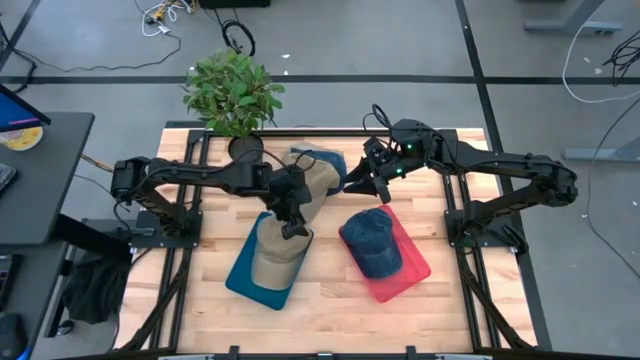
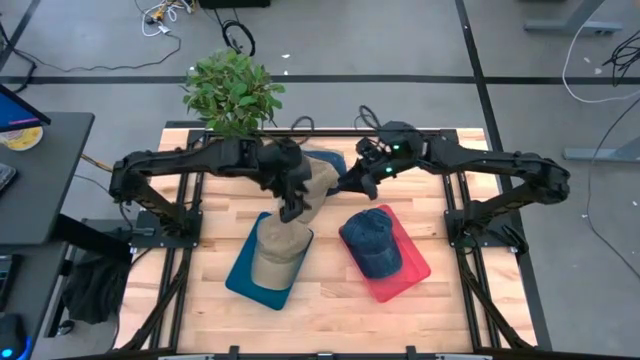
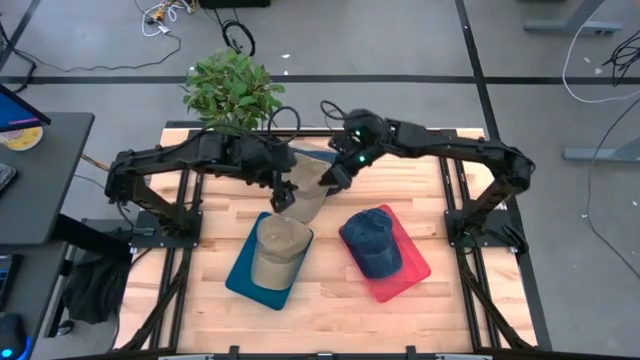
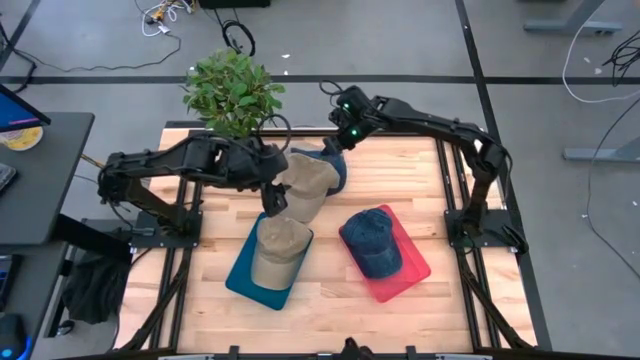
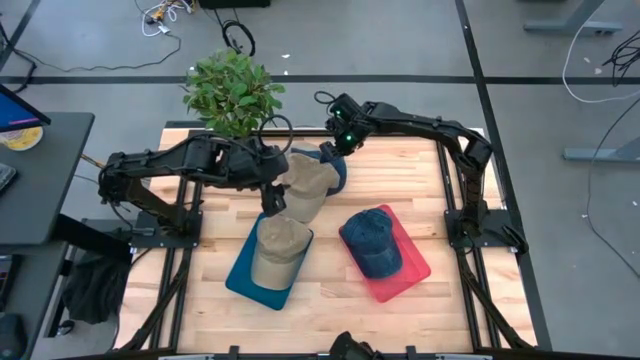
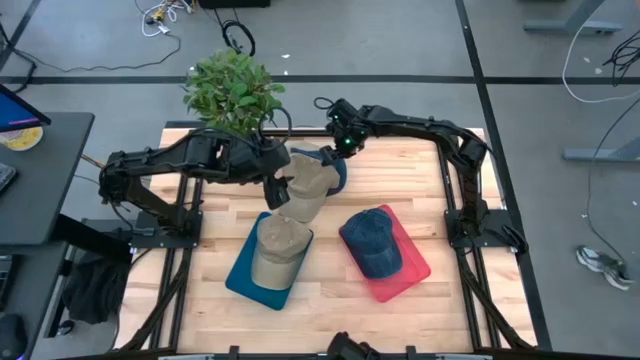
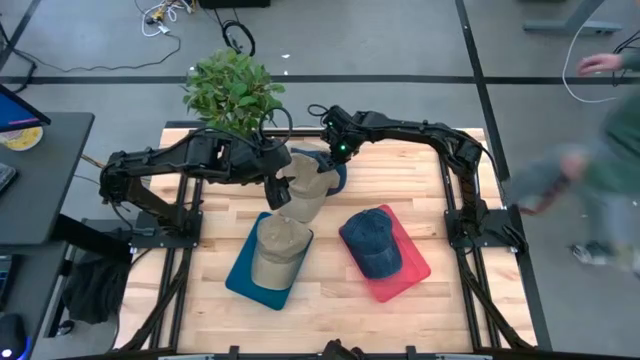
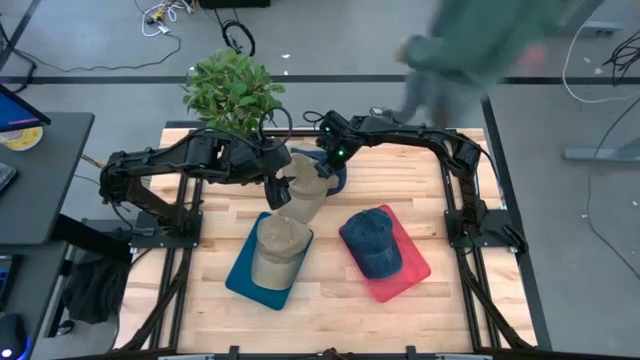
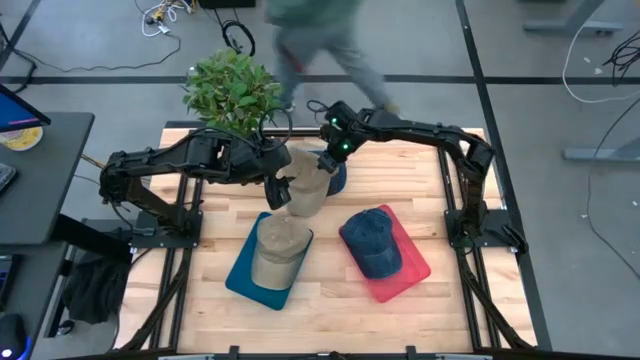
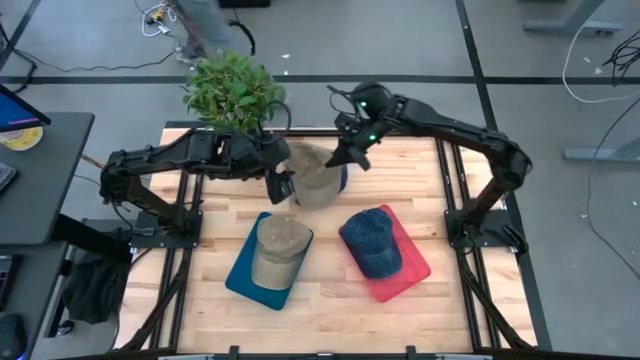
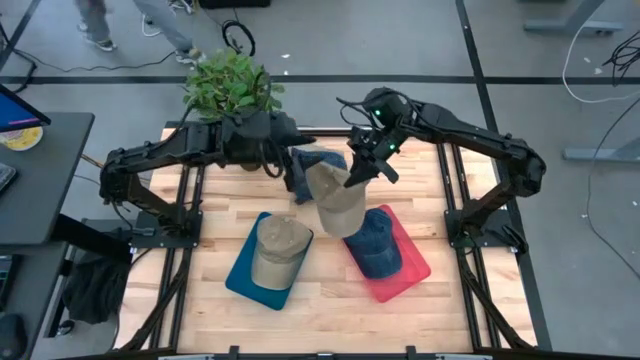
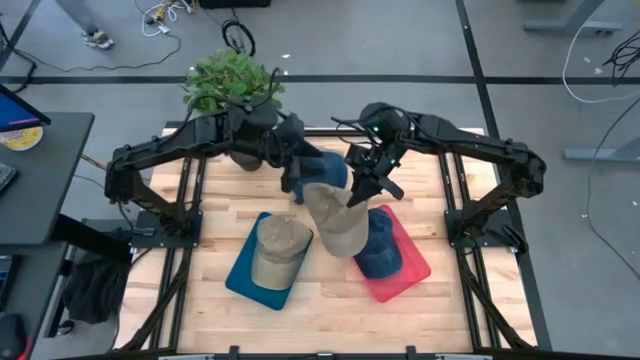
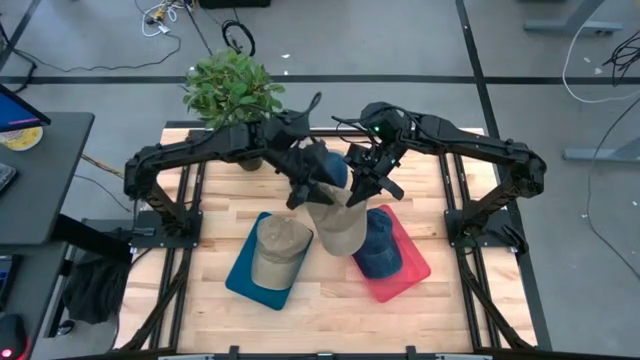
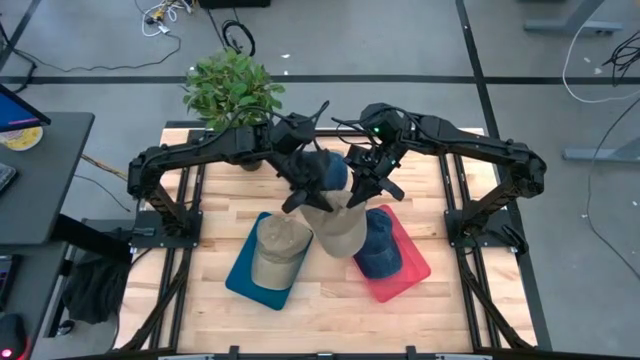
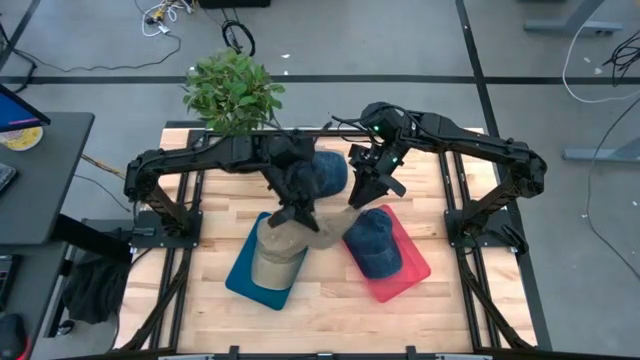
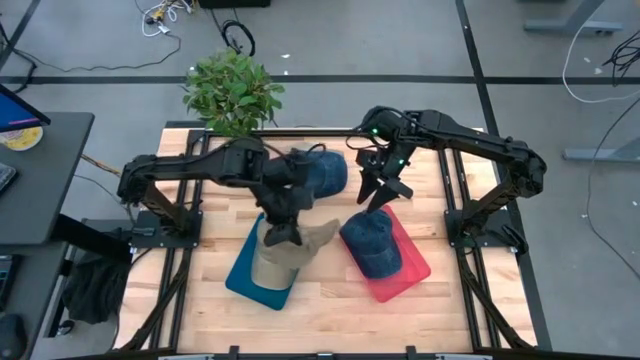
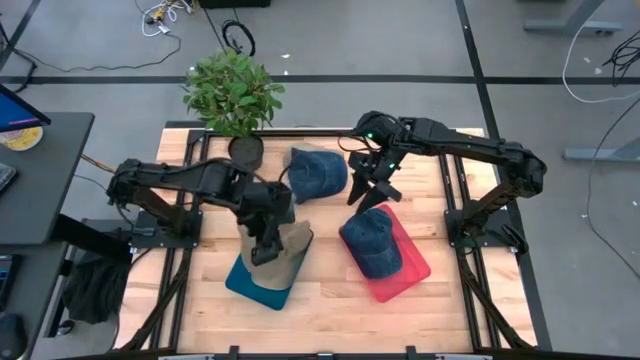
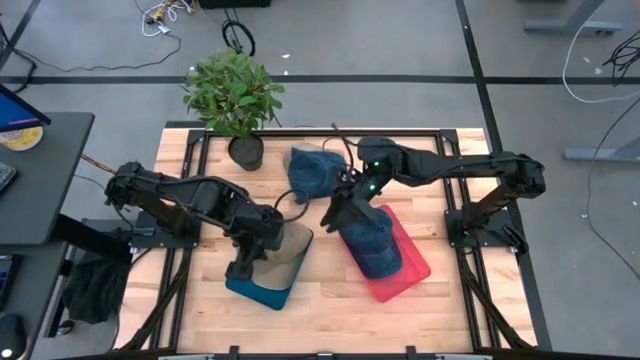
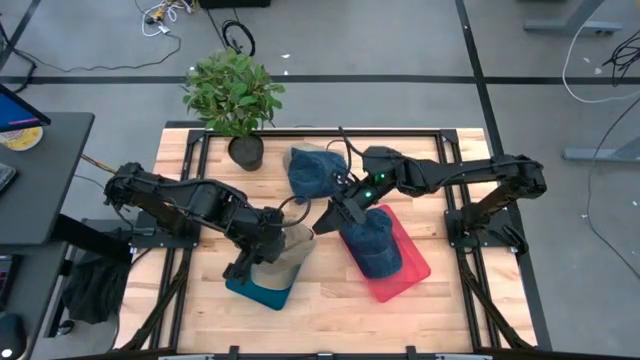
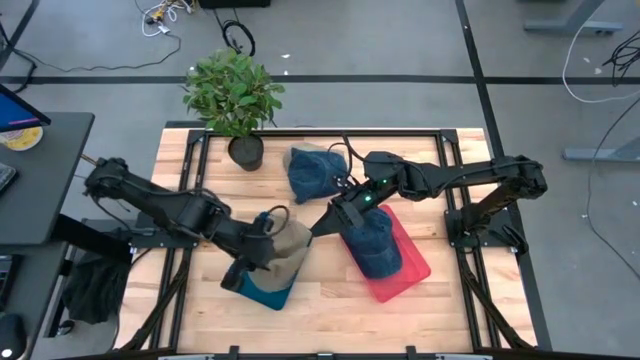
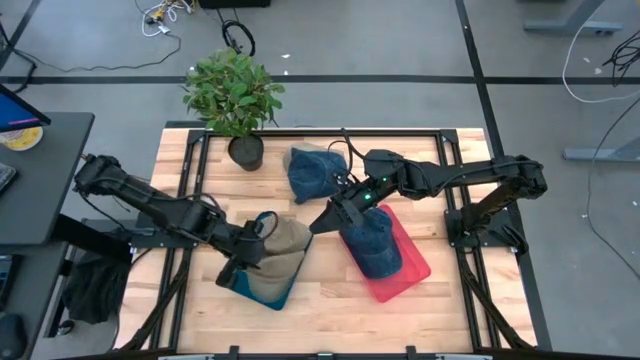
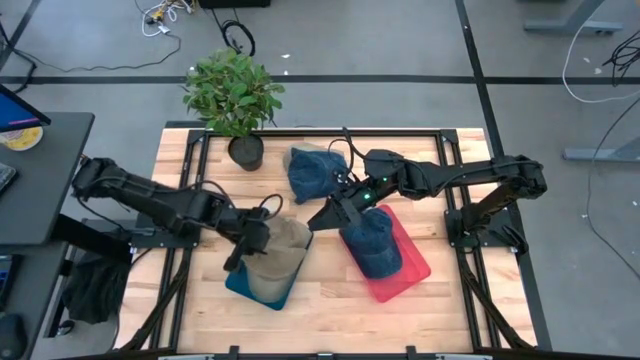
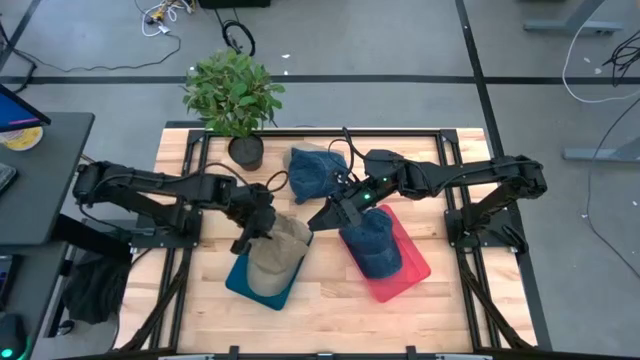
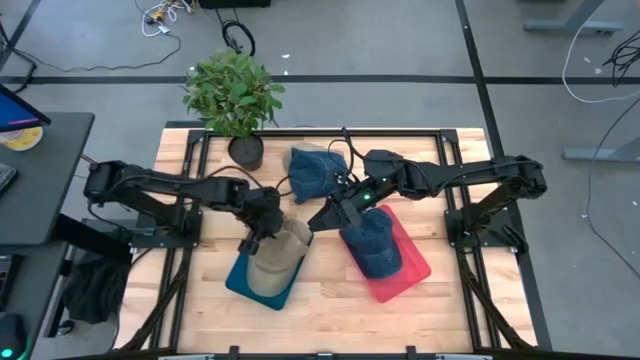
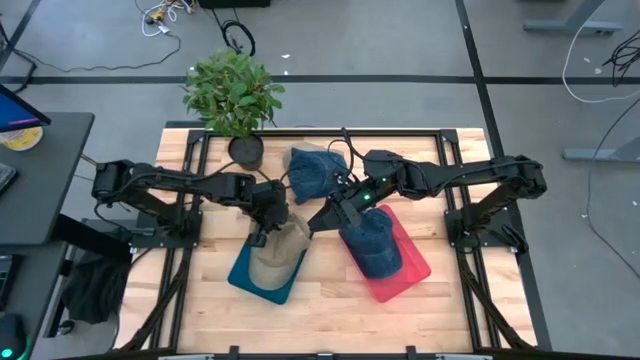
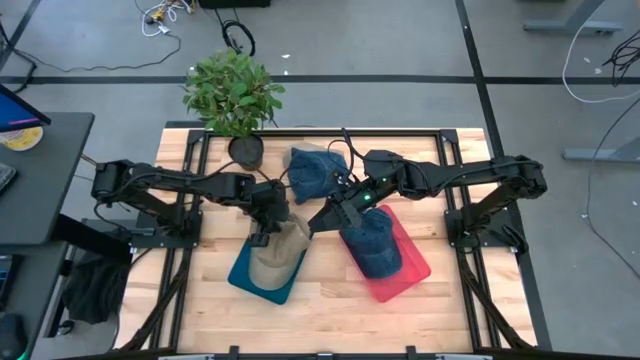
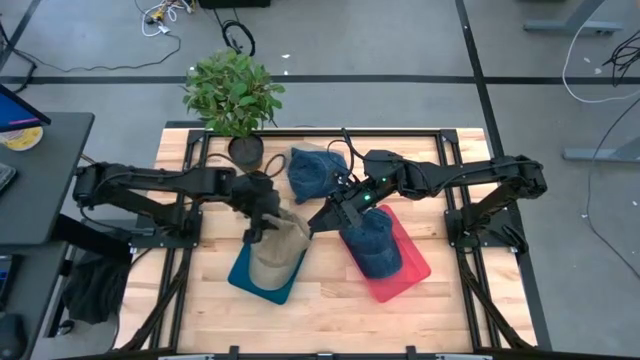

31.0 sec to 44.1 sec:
Task: Pick & Place hat
Put the brown cap into the red bin

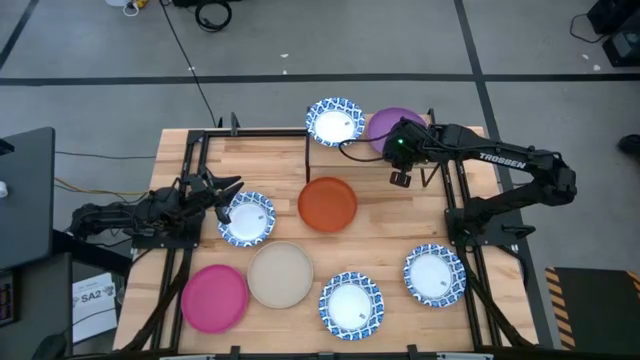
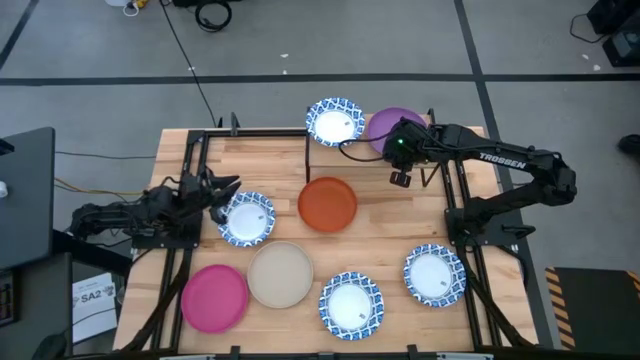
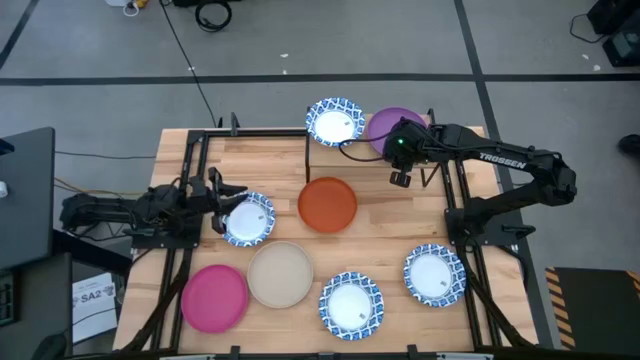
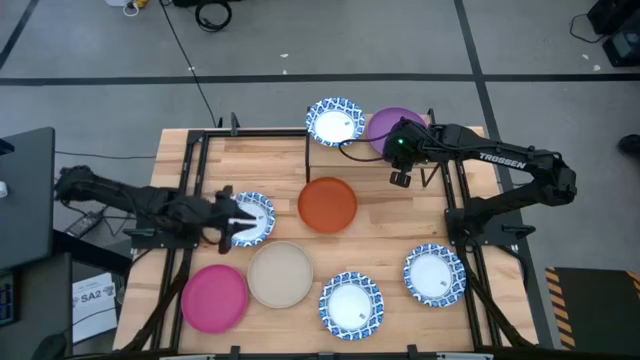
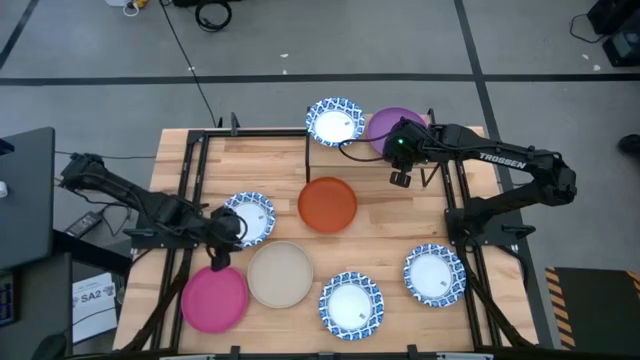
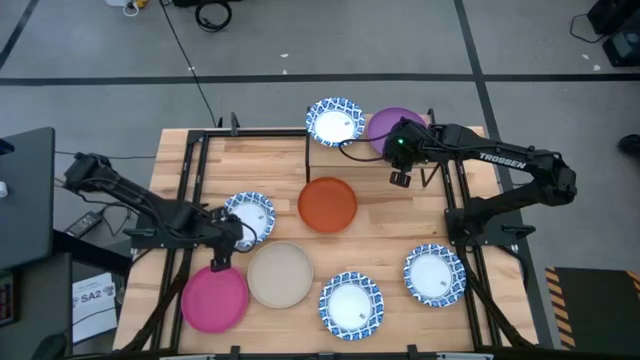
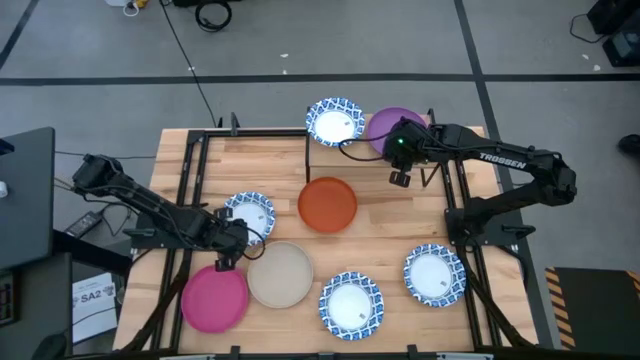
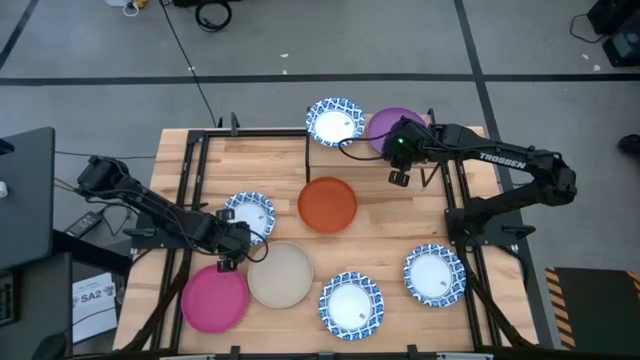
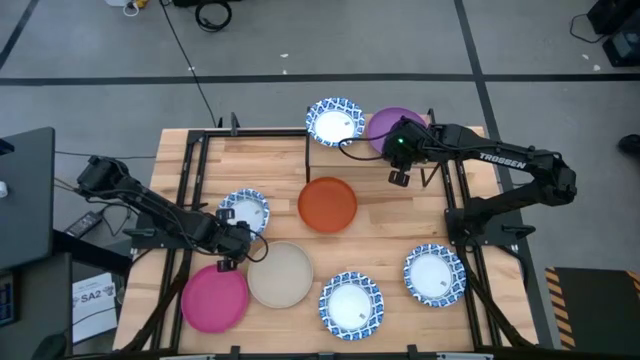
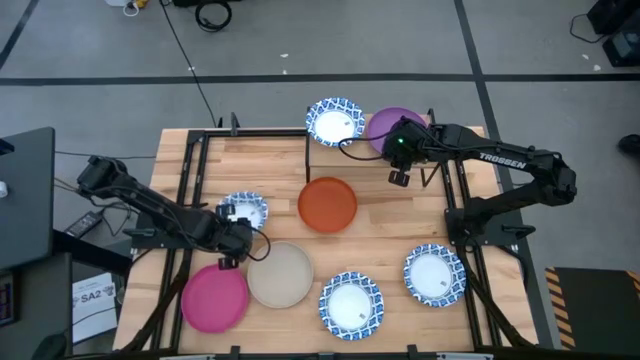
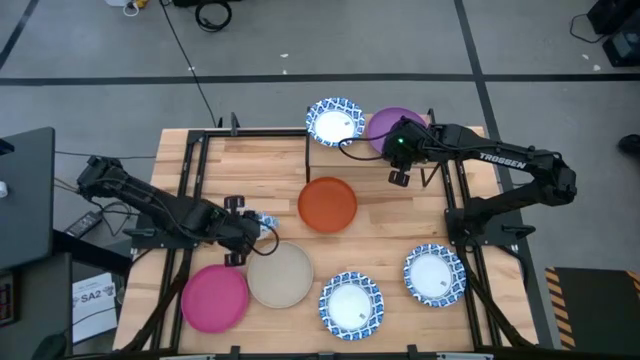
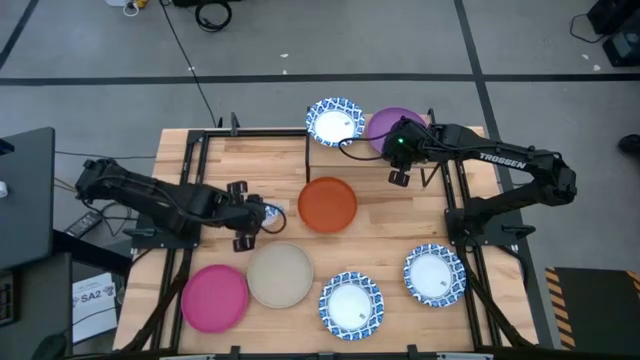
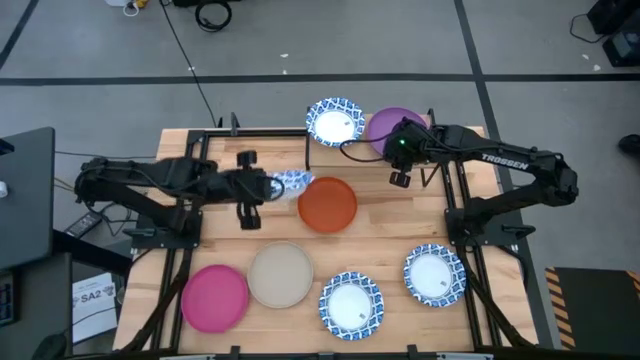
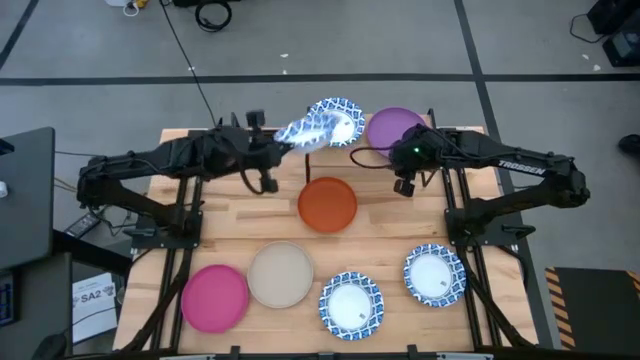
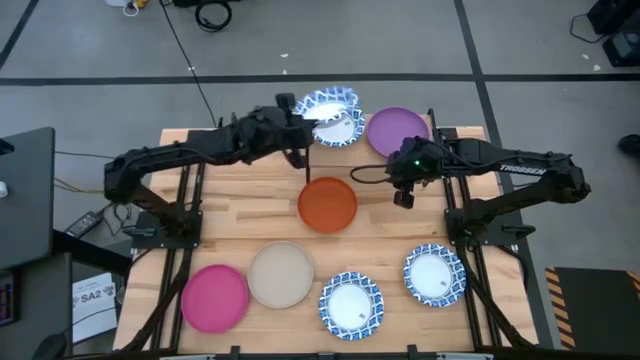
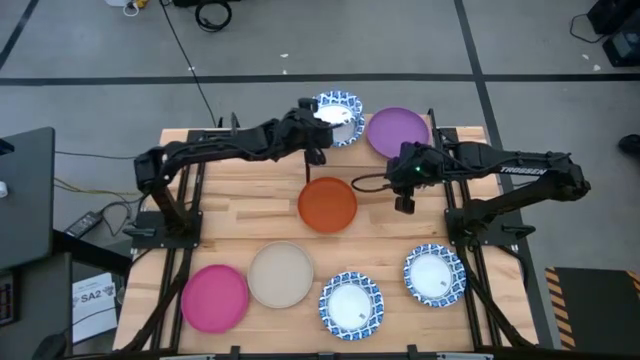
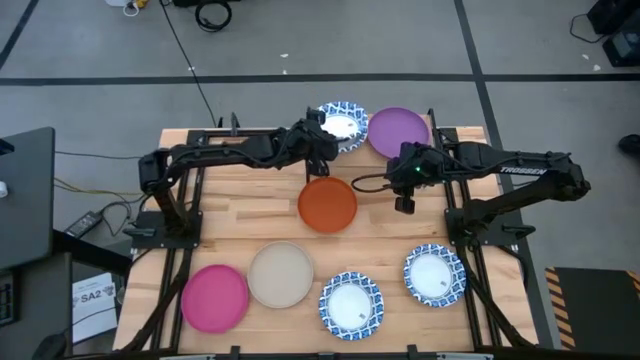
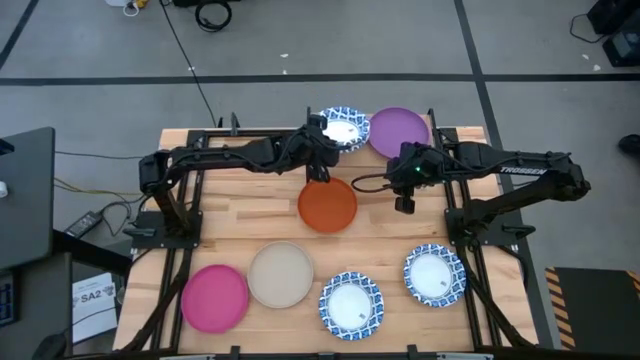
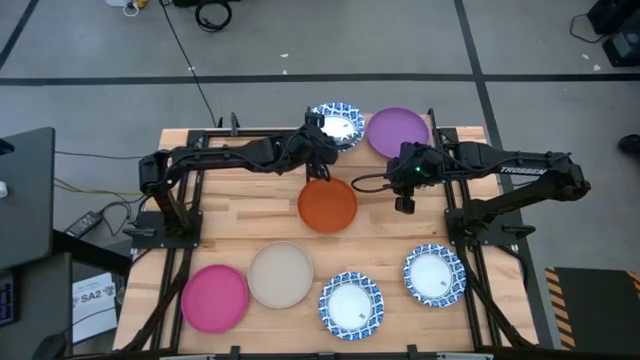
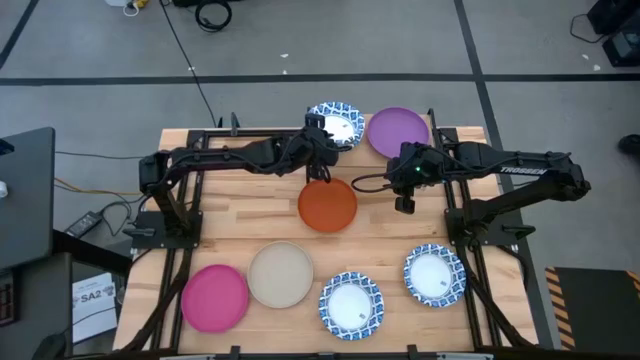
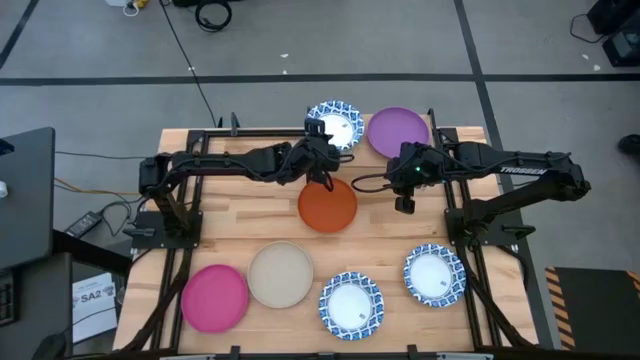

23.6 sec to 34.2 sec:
Task: Place and stack plates onto a shelf
Stack the white plate on top of the white plate on the shelf
